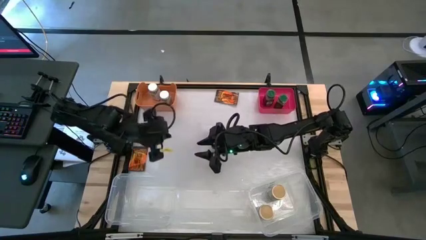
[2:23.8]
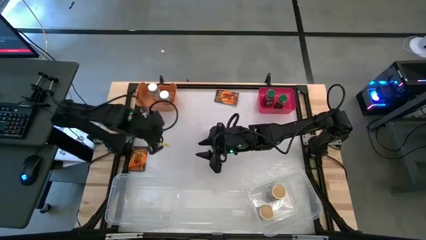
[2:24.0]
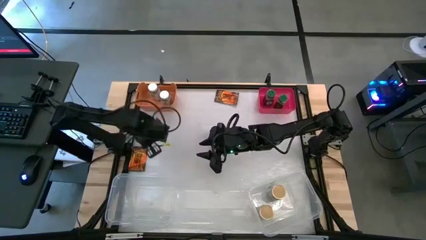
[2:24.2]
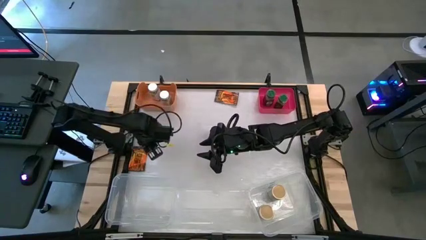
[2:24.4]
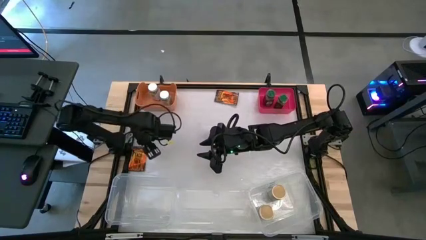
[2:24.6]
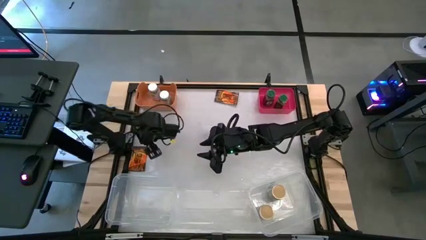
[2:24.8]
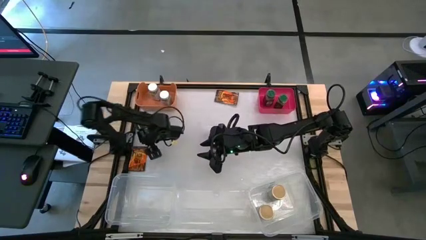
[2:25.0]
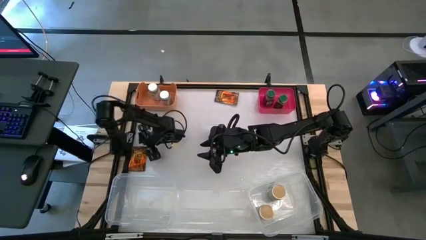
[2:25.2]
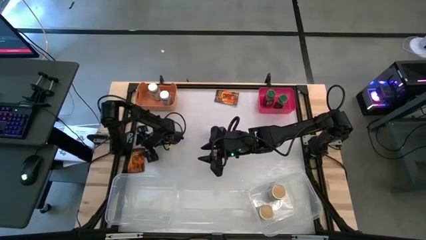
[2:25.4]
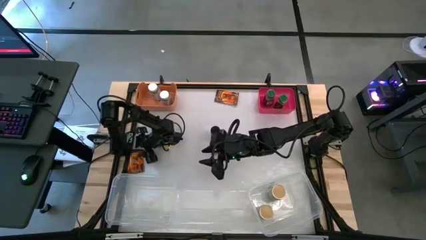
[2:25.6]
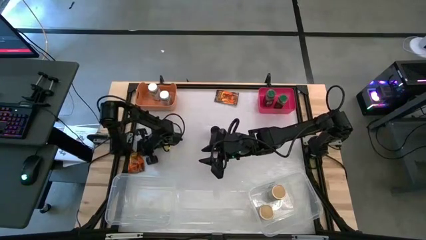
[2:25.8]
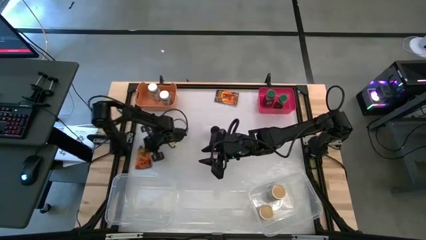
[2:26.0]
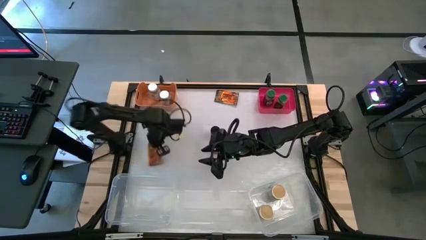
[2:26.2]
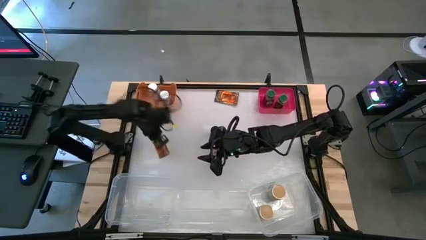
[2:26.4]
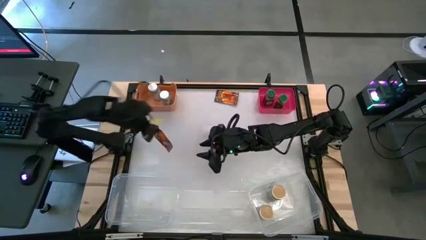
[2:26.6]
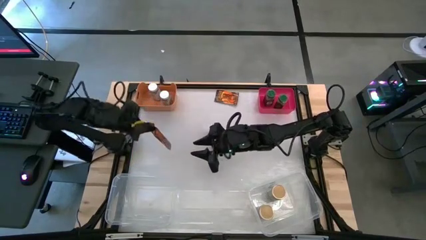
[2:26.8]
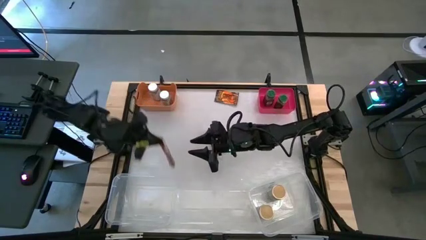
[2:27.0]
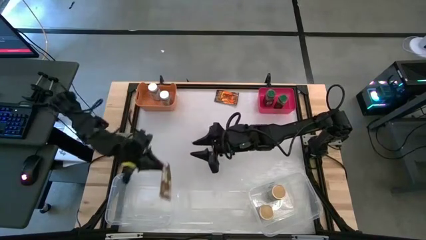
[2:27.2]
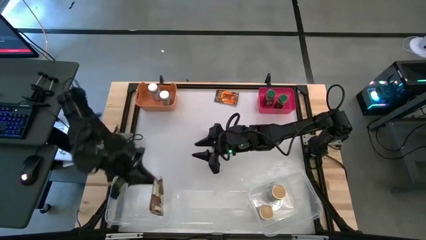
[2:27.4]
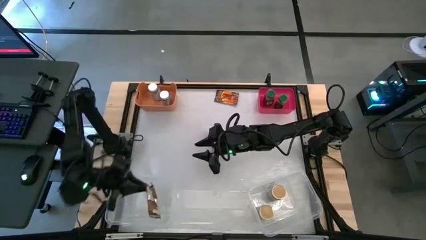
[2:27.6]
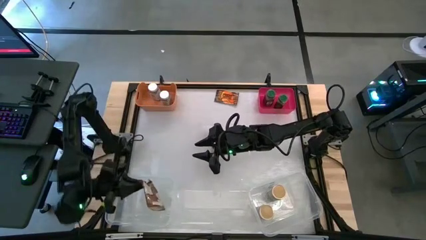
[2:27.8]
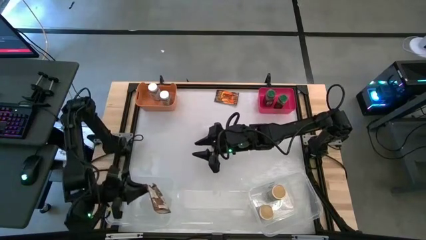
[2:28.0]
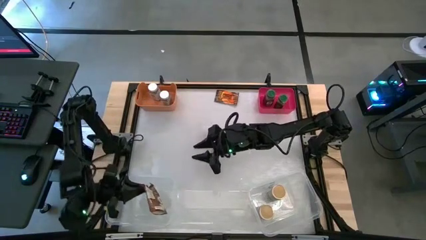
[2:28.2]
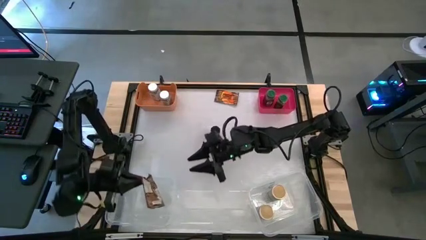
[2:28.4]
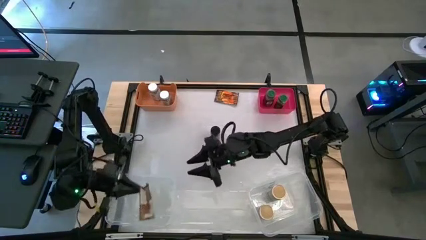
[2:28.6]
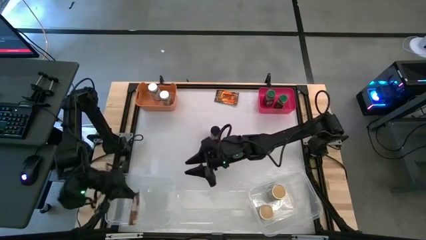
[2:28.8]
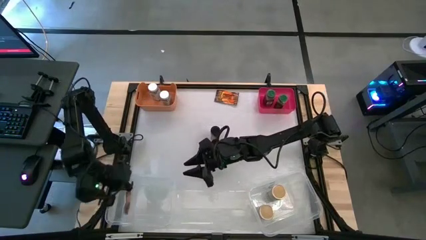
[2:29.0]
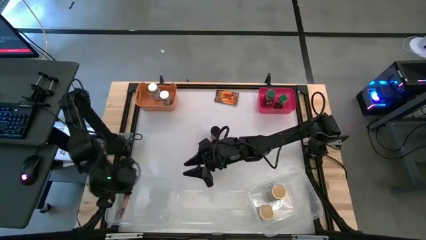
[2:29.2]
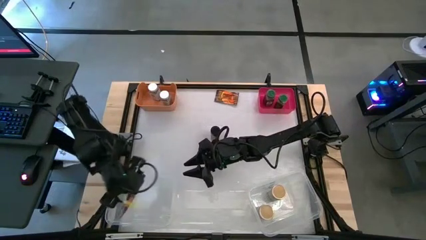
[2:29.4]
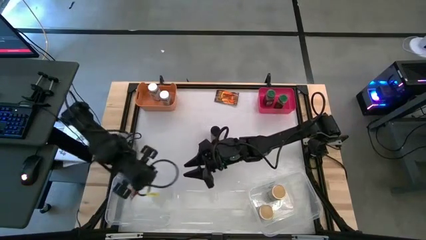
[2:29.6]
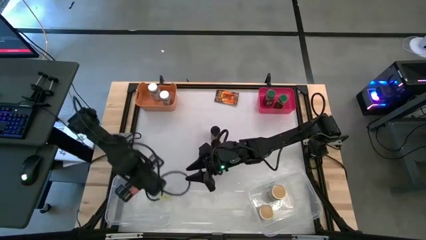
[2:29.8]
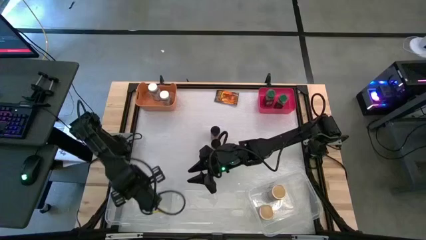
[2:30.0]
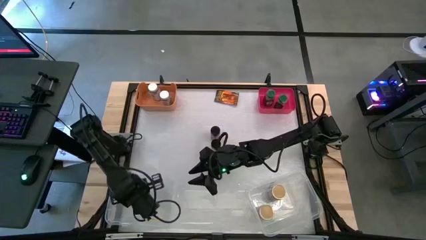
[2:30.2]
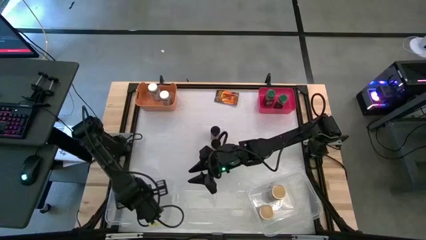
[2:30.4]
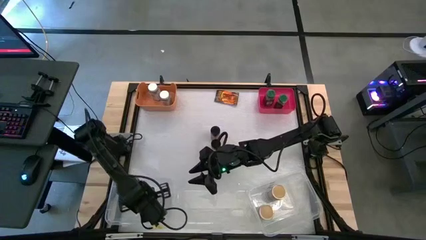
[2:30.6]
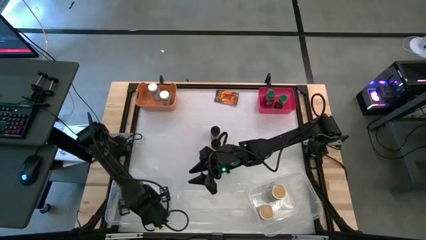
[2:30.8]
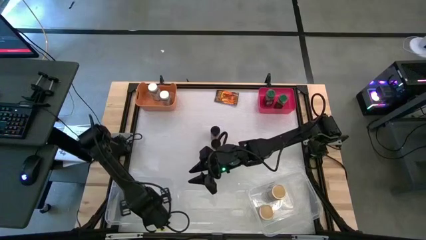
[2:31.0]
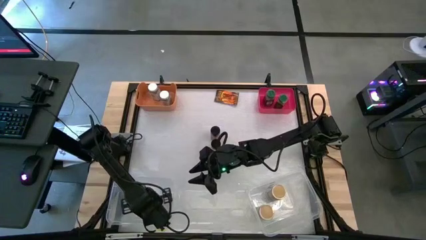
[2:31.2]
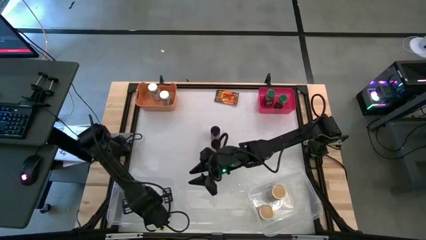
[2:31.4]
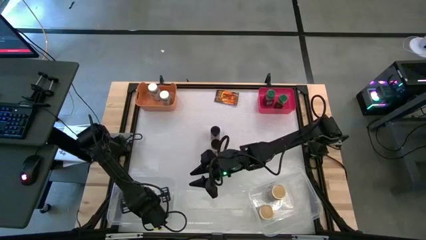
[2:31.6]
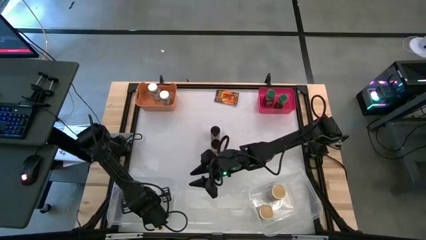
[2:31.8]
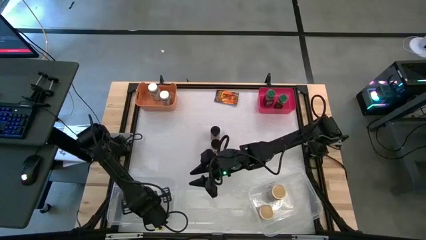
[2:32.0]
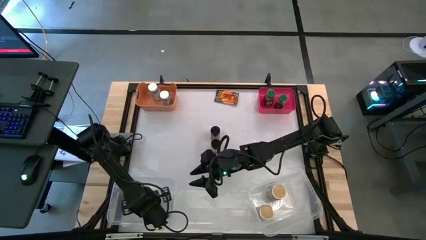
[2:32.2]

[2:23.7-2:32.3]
Task: Sort spices by type
Put the bottom orange seasoning bag into the left transparent bin

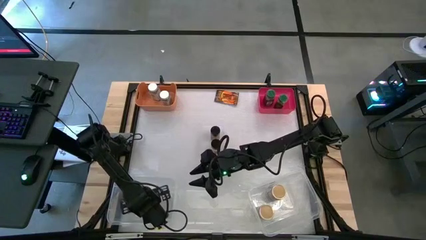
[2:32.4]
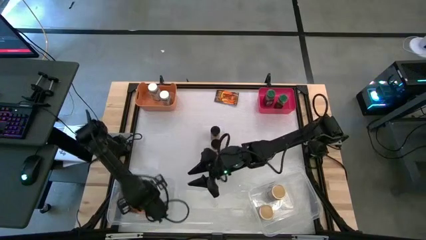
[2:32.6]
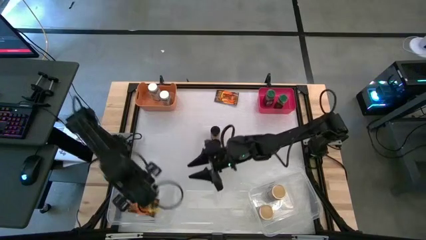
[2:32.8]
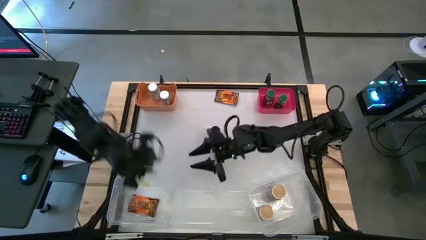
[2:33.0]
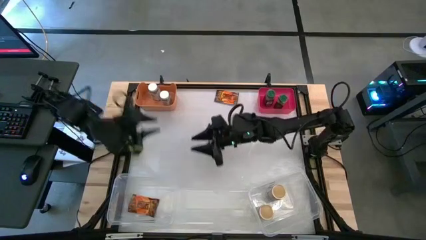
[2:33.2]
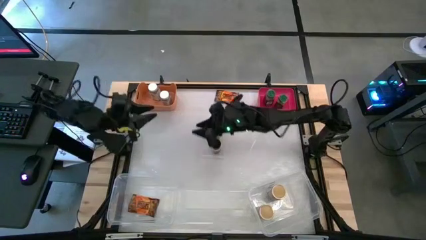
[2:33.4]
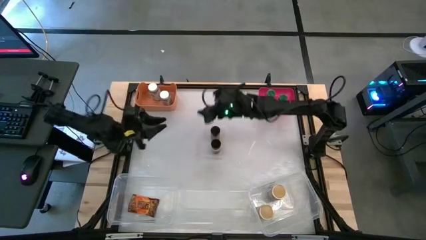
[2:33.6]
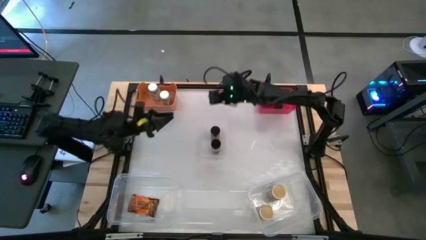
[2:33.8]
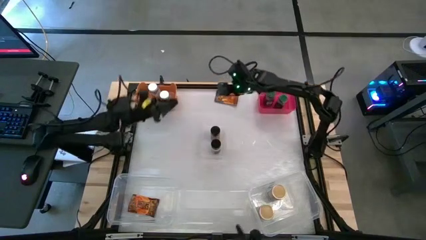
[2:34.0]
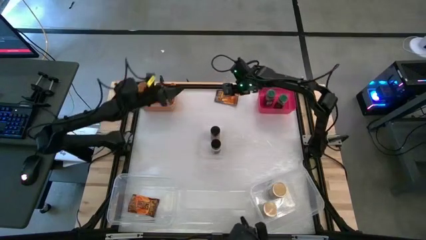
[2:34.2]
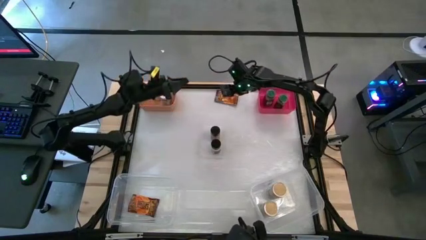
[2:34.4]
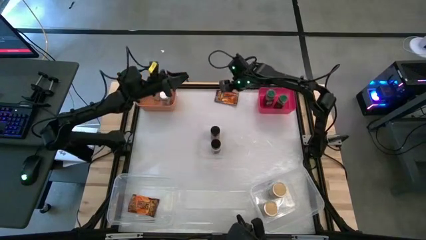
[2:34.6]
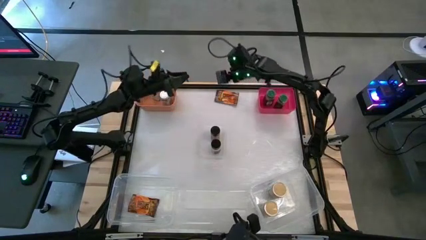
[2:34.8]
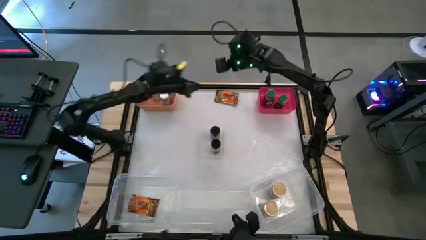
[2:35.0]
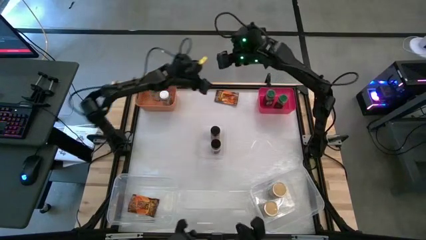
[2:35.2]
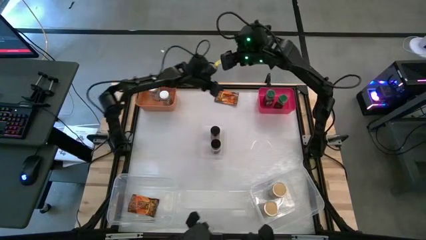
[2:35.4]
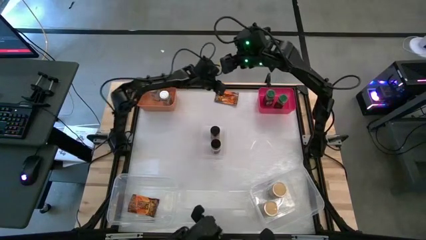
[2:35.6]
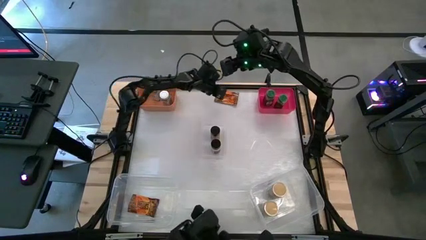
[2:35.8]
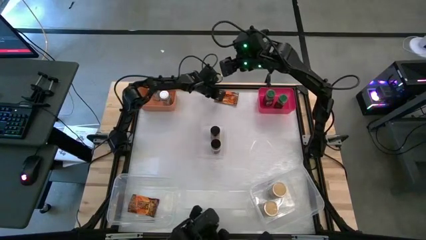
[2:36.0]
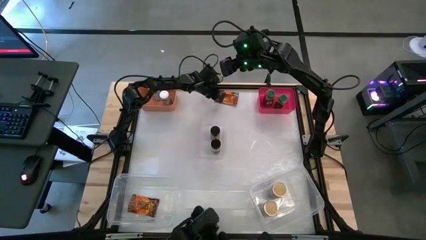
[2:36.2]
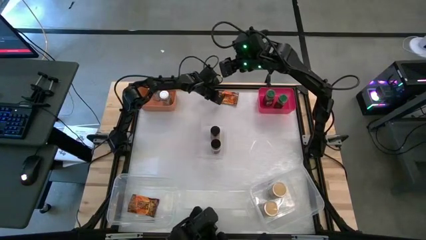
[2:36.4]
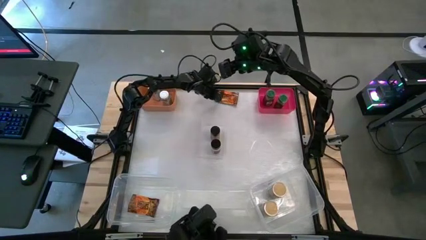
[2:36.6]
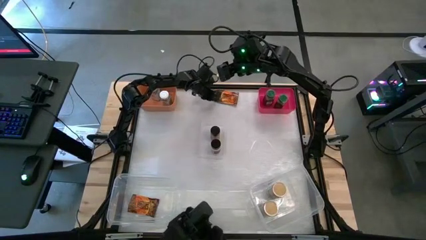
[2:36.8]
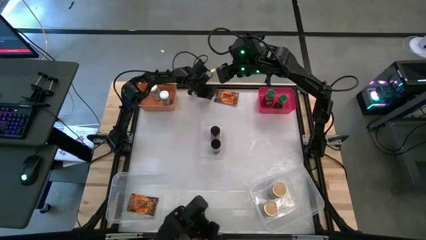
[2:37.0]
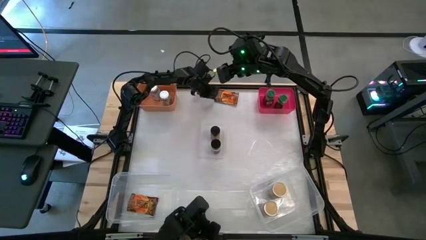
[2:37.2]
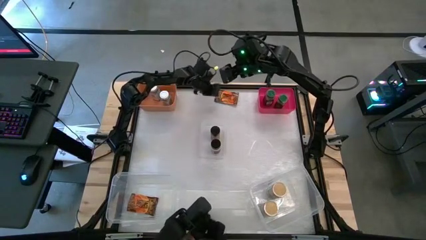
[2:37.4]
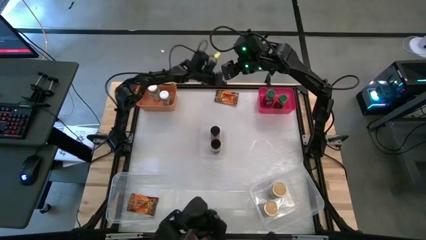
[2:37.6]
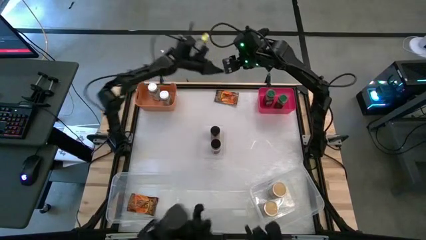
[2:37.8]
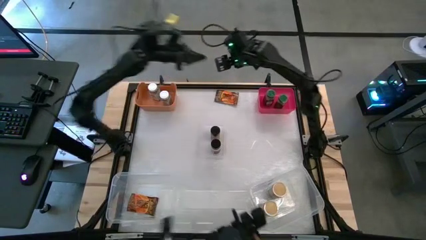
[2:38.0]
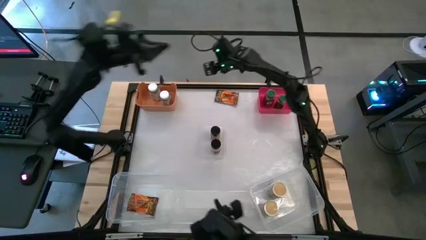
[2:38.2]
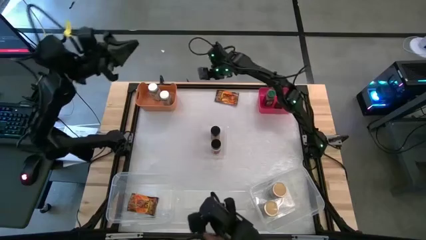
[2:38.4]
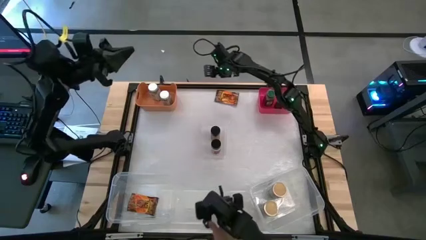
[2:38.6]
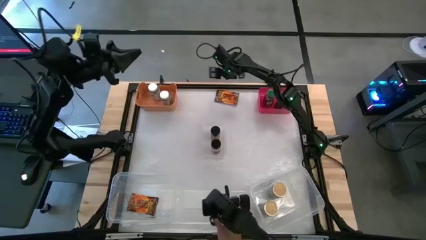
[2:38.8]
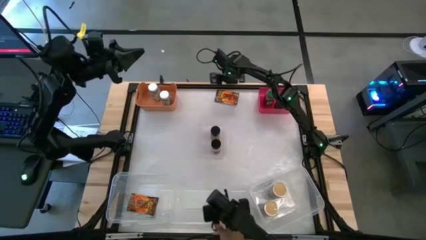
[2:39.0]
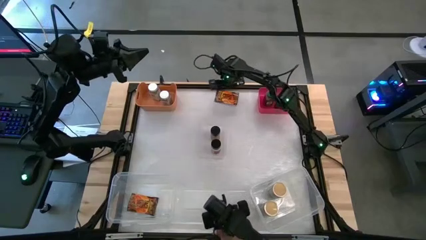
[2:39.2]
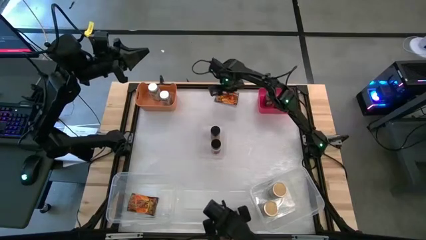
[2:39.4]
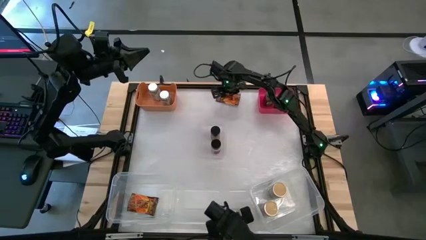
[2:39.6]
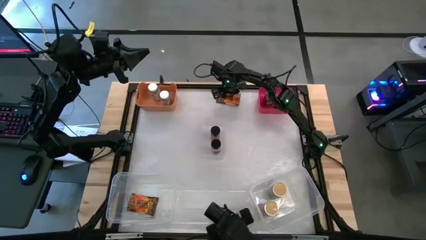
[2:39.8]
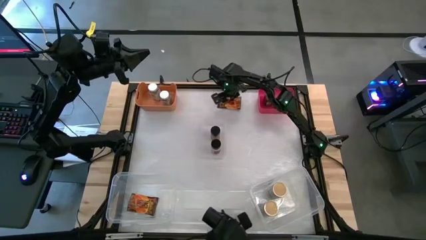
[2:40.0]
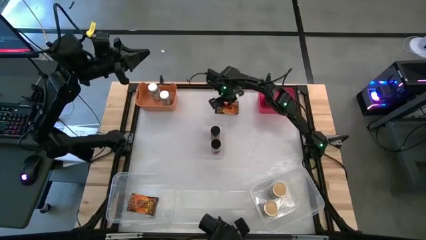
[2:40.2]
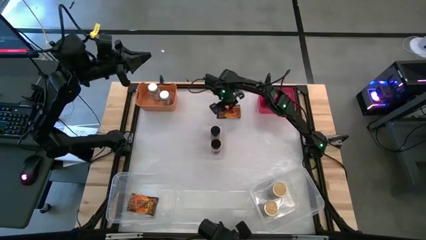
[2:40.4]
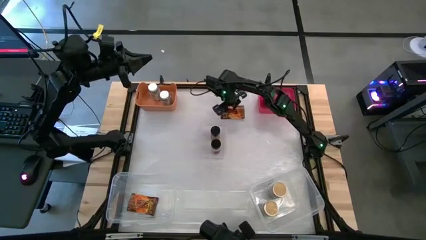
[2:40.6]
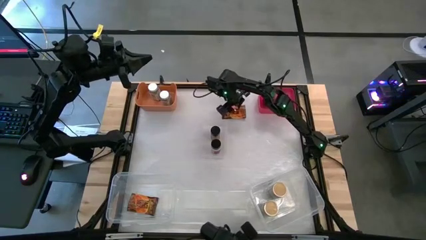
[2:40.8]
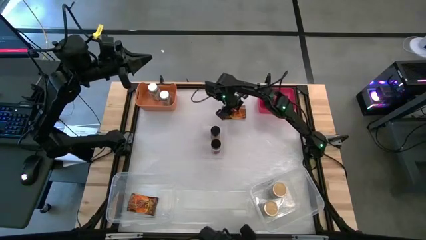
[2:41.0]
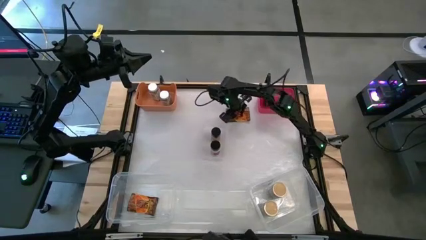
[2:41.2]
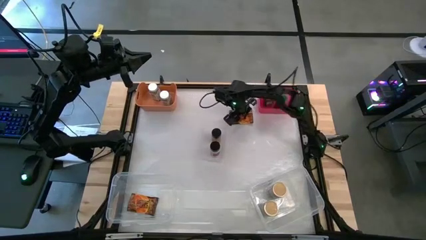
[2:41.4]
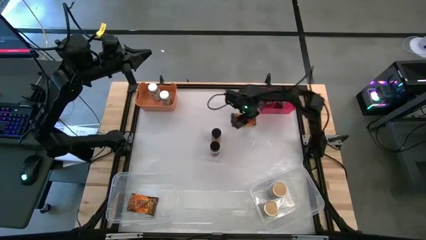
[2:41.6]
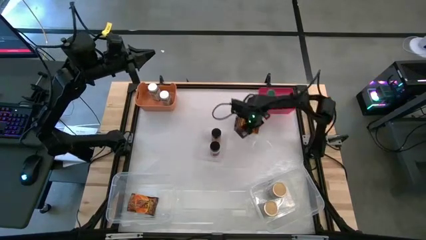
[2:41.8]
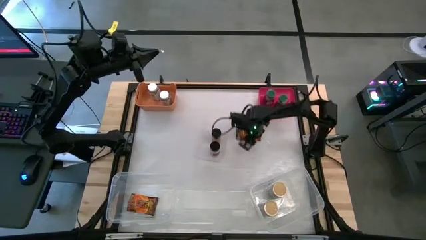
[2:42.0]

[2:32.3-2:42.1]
Put the orange seasoning bag into the left transparent bin
